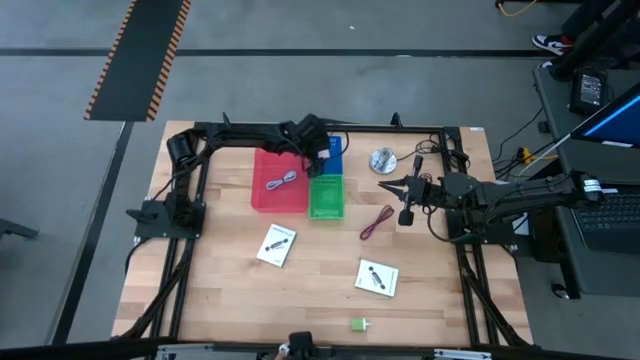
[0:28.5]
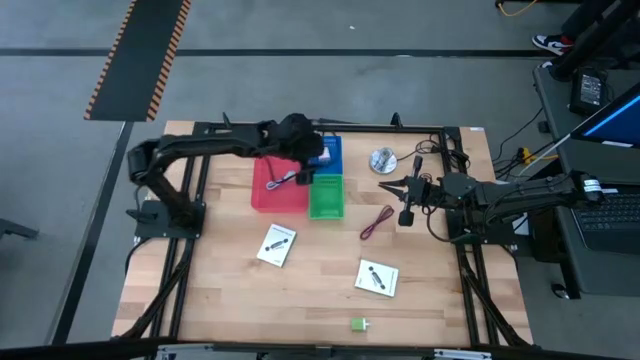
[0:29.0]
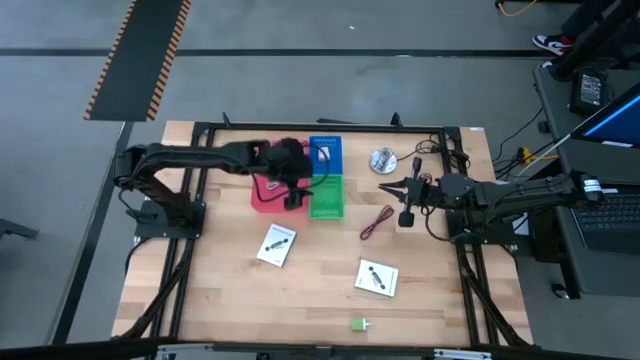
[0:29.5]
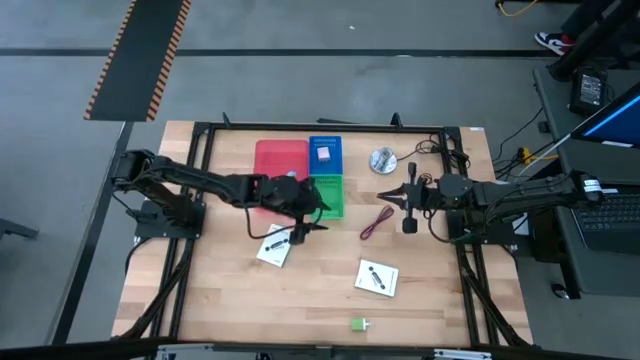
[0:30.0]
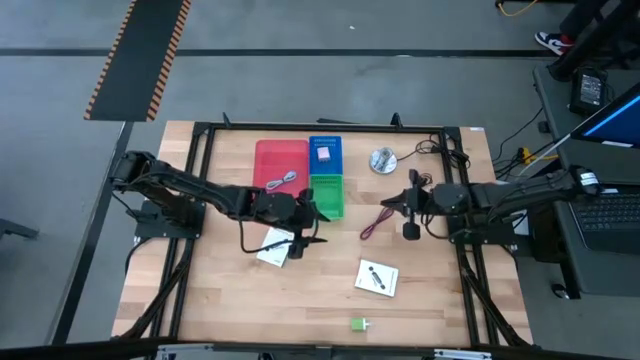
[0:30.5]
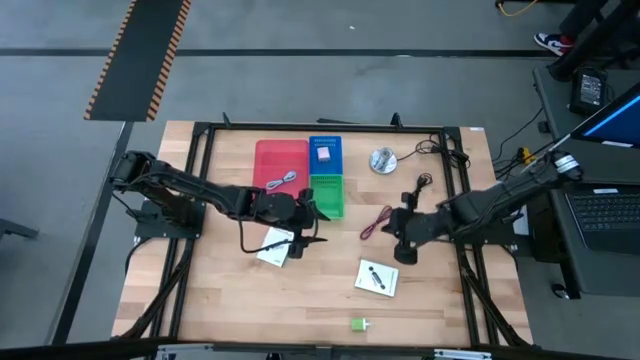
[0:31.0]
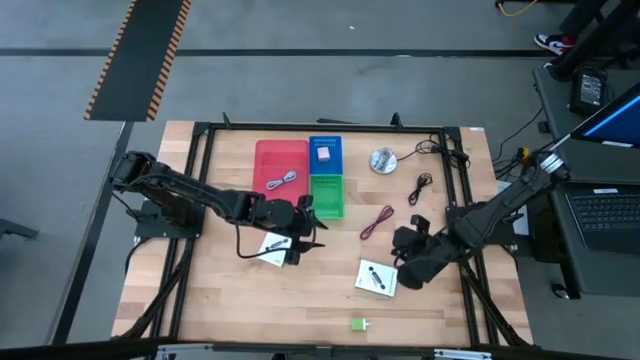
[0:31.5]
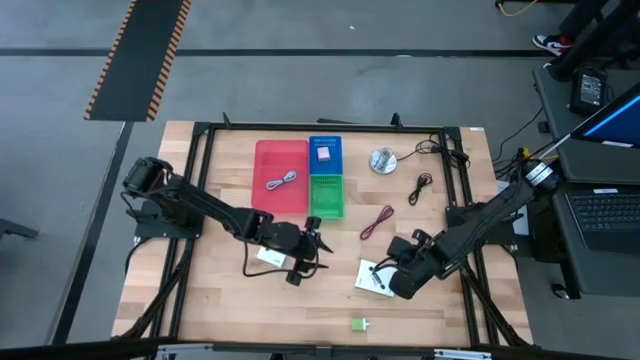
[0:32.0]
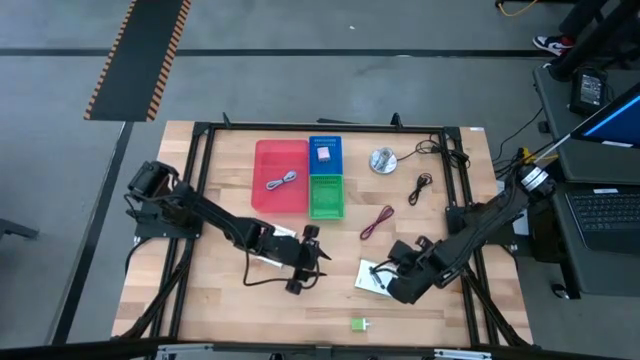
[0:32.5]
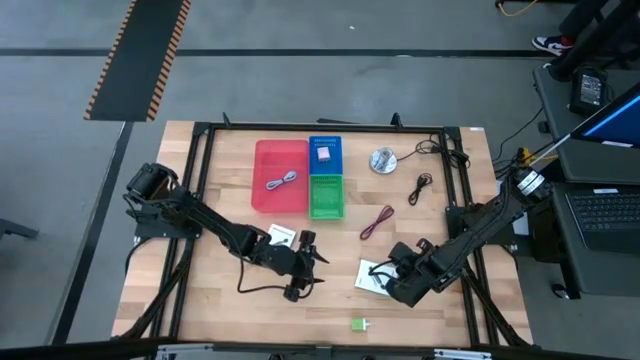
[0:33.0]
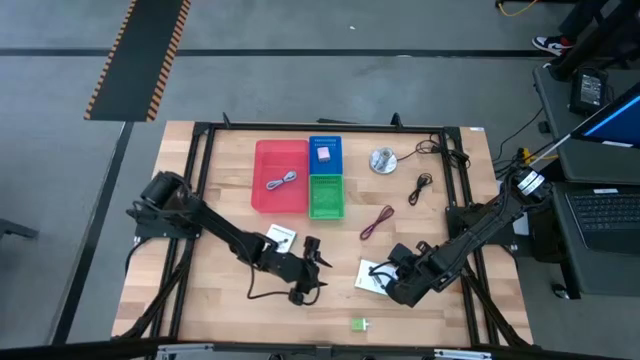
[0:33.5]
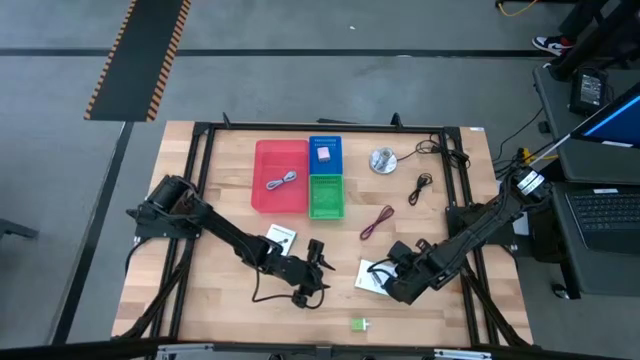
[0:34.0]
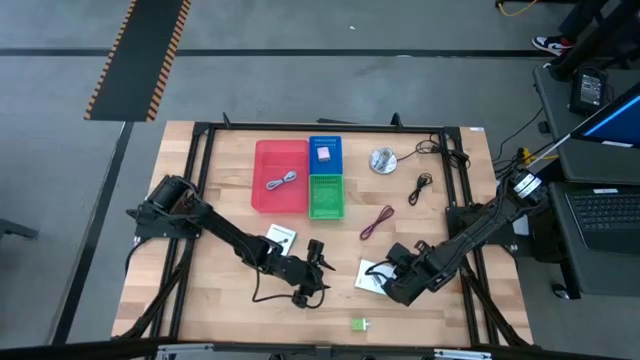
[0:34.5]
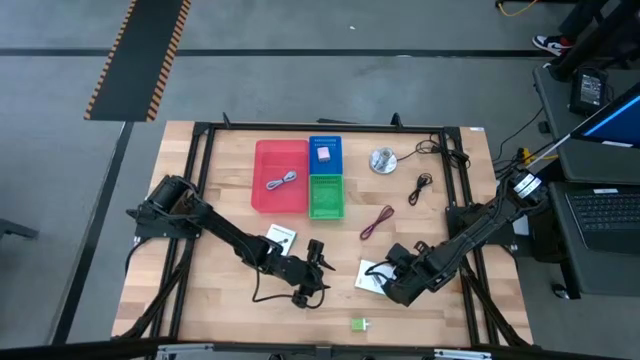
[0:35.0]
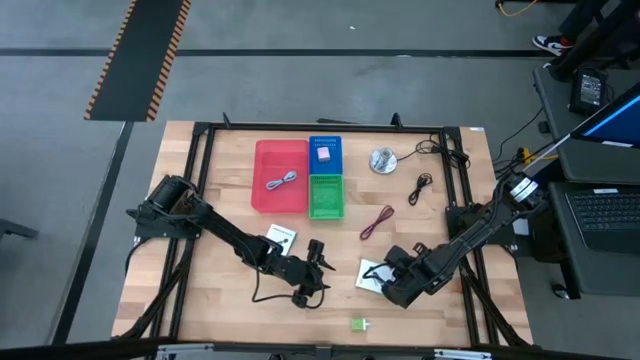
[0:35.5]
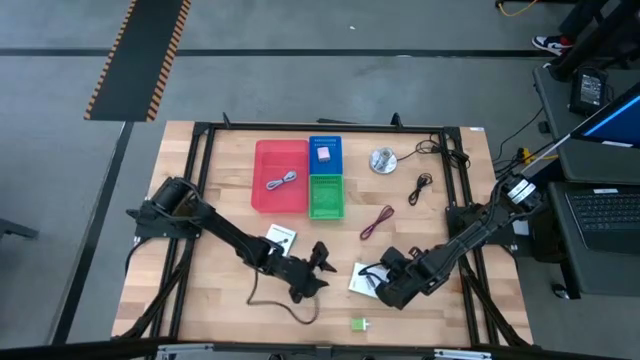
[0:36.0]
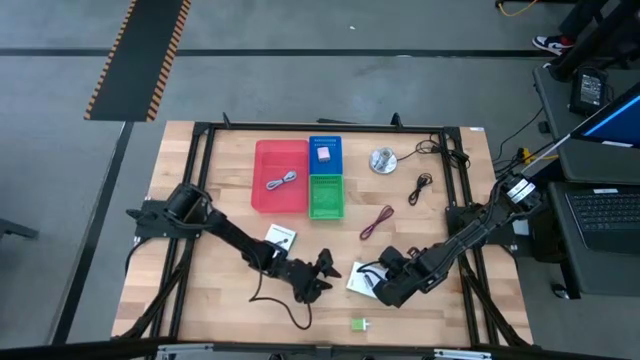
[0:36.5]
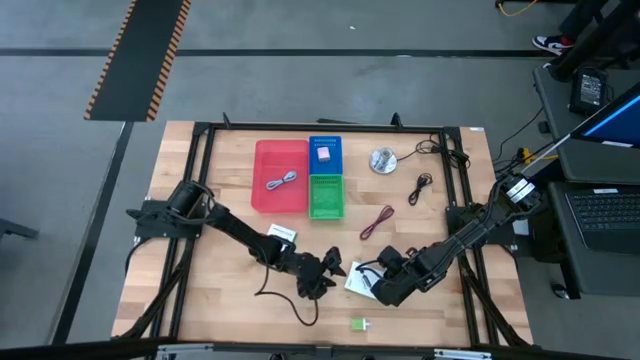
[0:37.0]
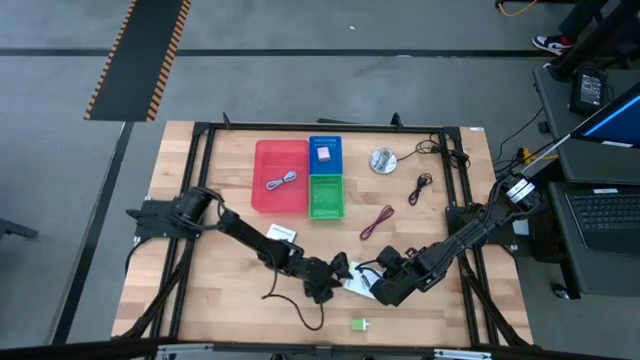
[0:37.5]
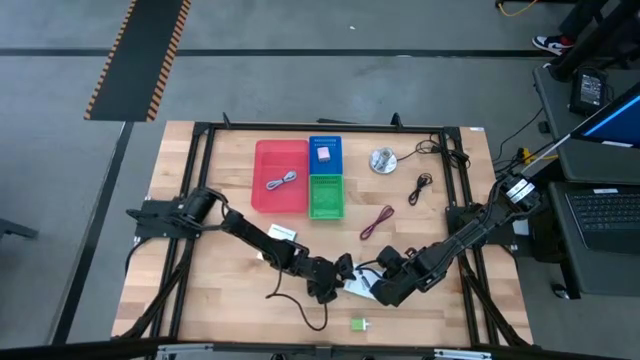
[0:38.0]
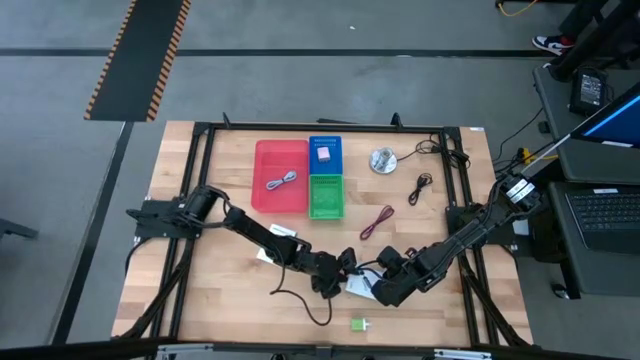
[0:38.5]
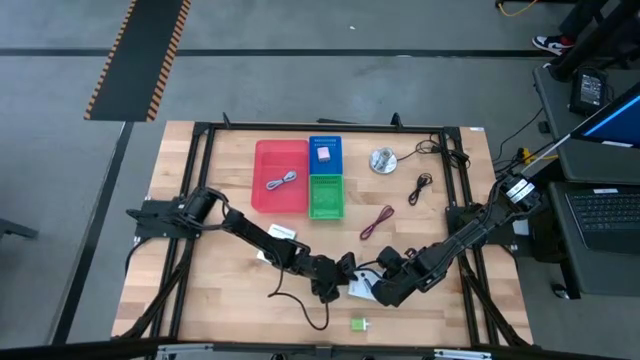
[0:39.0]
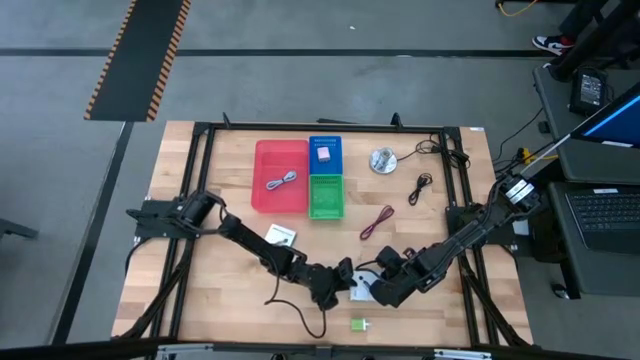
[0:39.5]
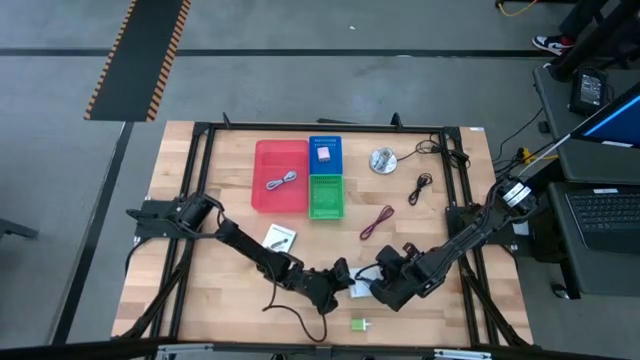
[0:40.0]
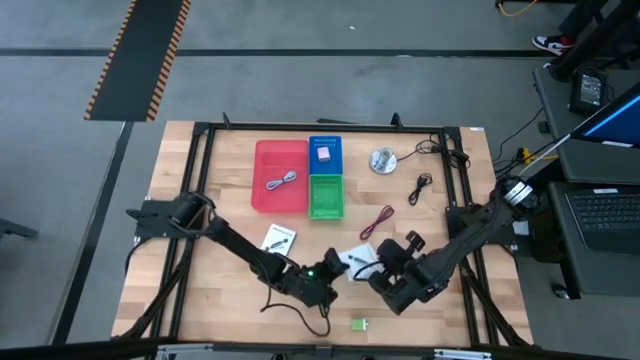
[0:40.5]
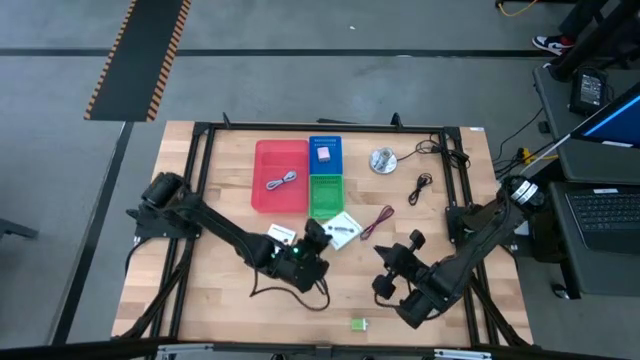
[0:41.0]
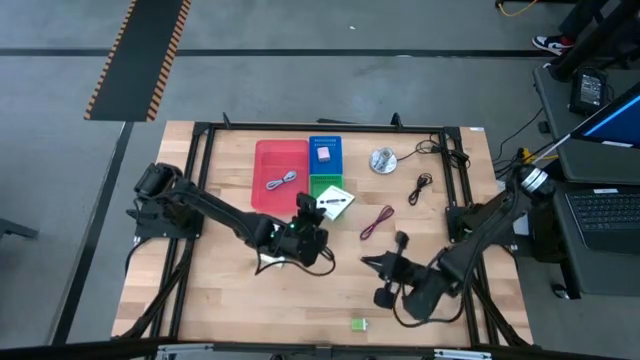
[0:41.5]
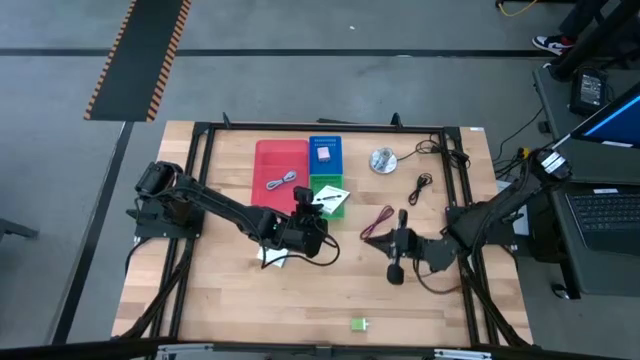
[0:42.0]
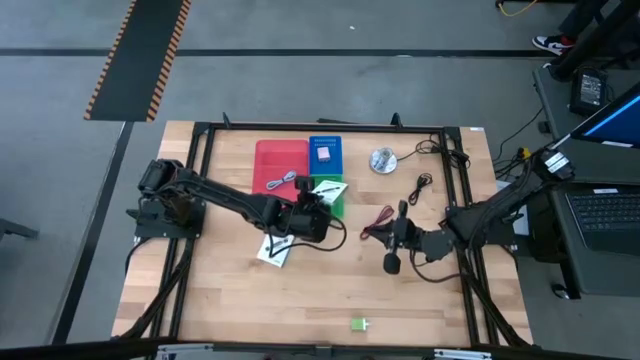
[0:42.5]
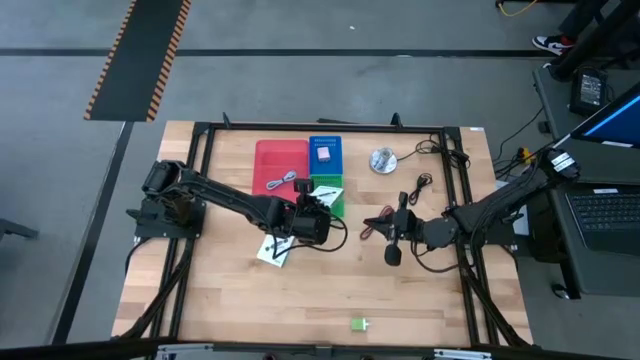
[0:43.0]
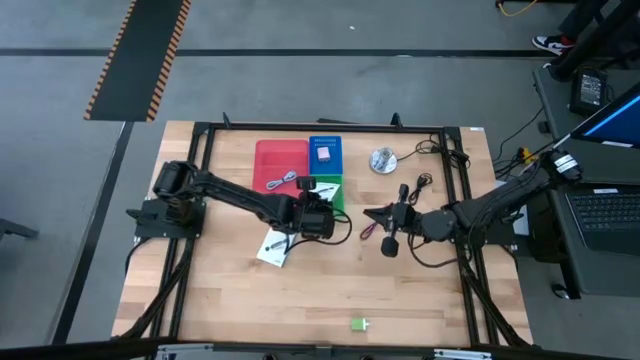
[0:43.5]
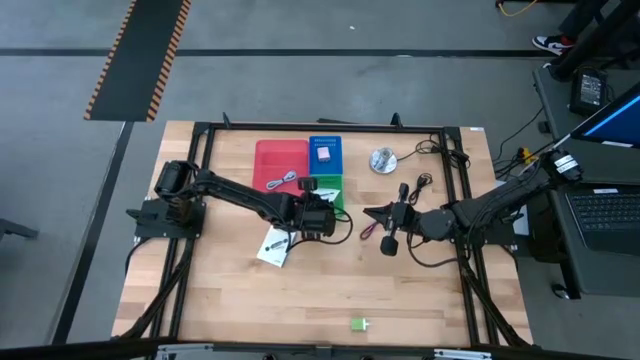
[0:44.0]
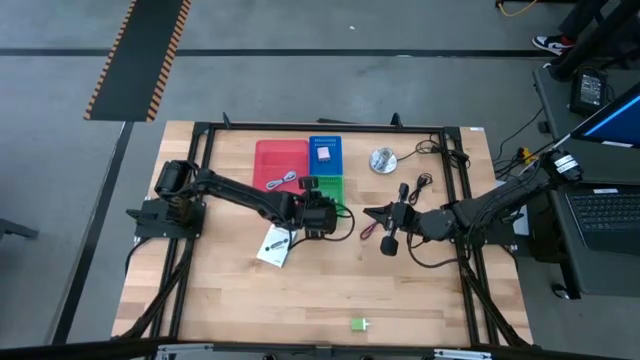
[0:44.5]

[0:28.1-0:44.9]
Task: Pick and place items into bin
Put the right white card reader box into the green bin

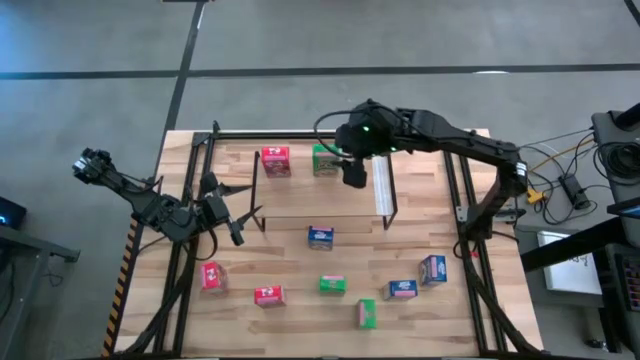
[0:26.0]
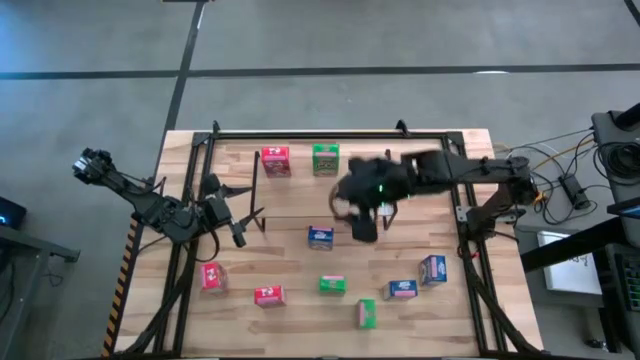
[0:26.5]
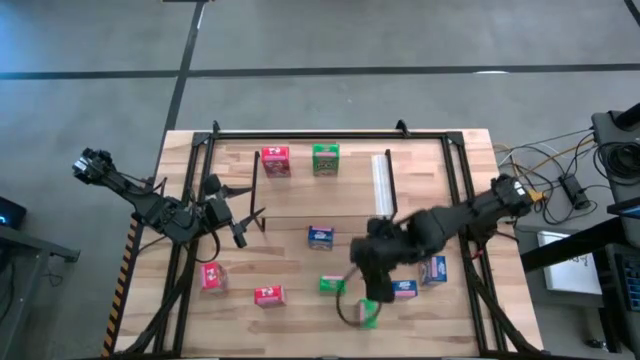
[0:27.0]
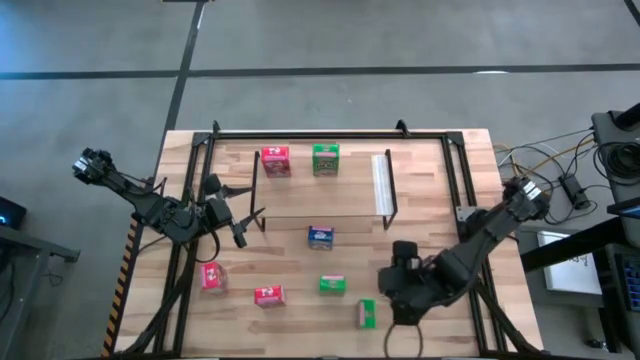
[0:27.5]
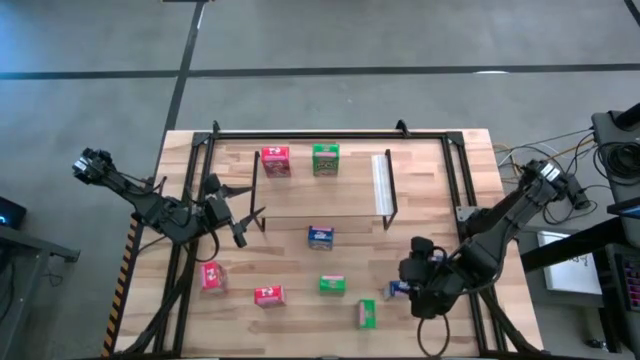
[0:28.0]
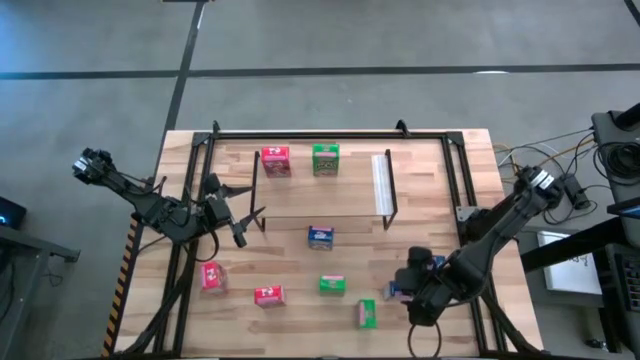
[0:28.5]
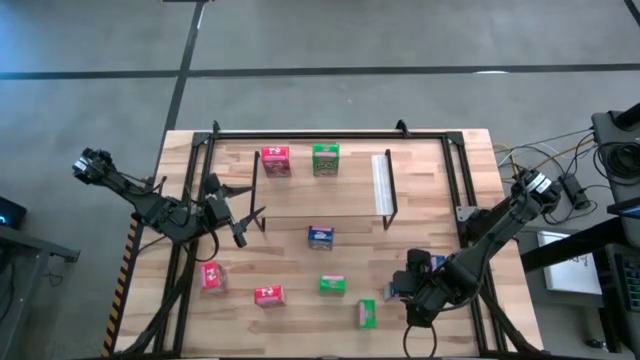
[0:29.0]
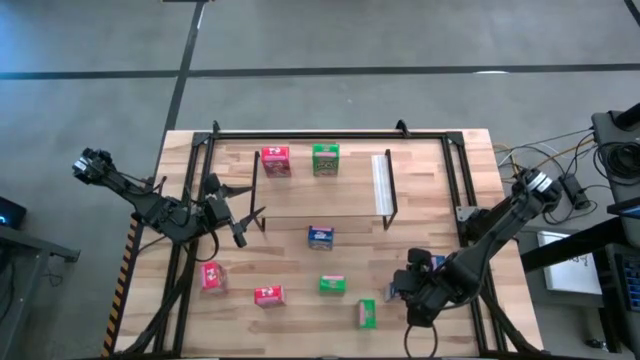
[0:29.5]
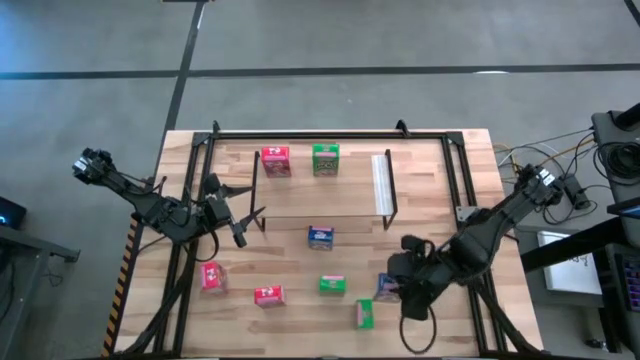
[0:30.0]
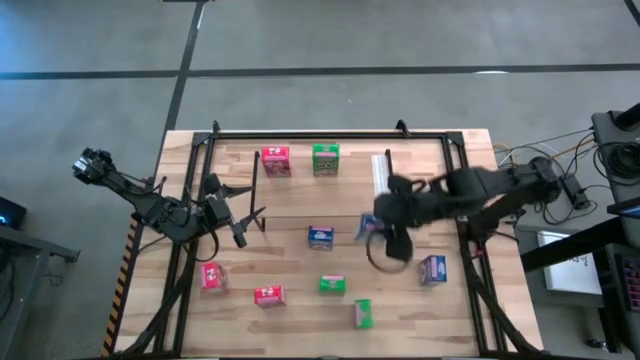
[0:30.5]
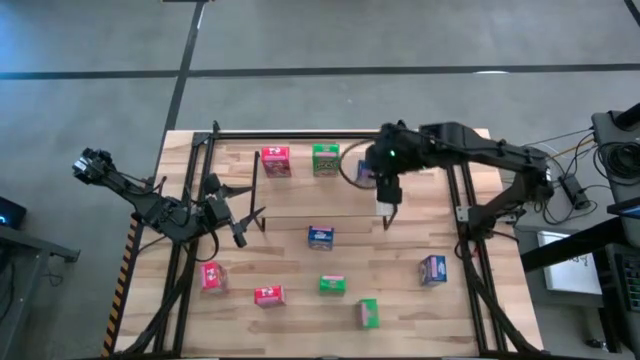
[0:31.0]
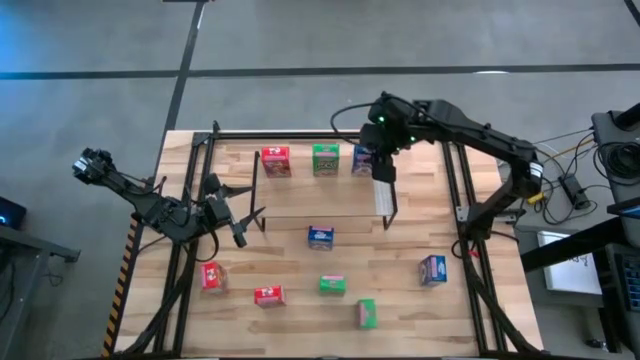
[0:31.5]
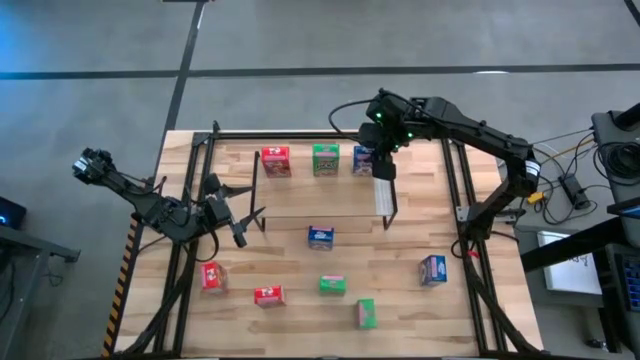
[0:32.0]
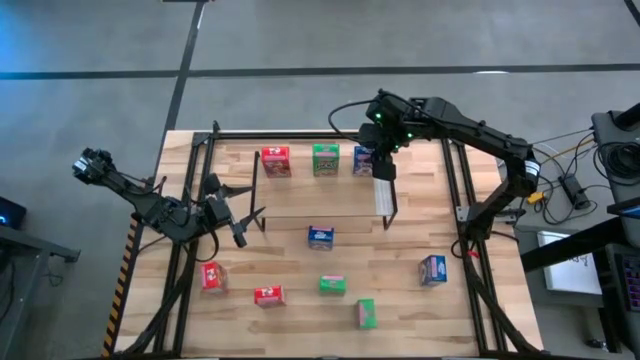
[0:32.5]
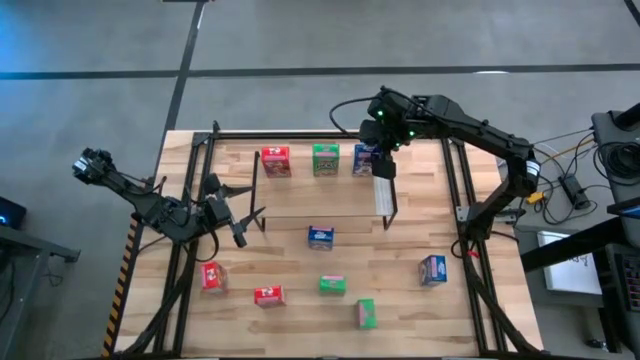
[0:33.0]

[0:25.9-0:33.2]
Task: Stack cereal on shelf
Put the bottom left blue cereal box on the shelf
